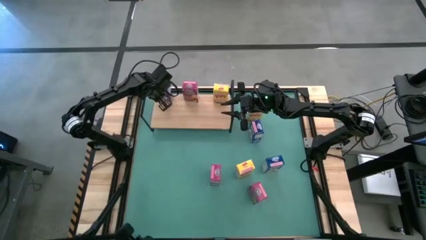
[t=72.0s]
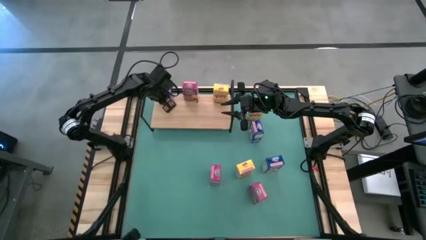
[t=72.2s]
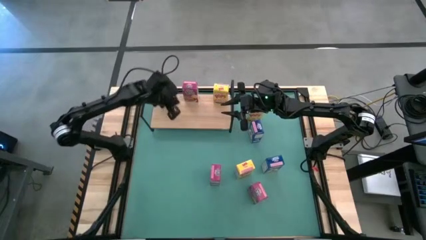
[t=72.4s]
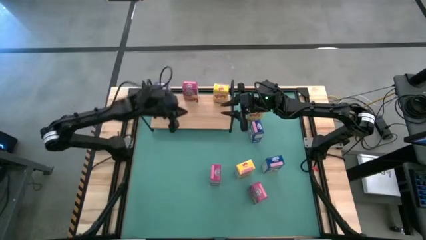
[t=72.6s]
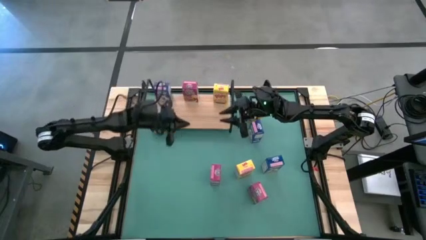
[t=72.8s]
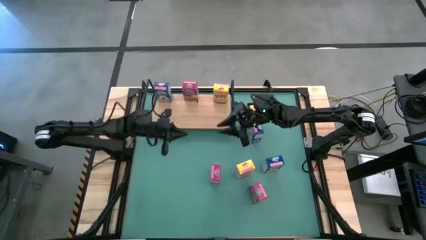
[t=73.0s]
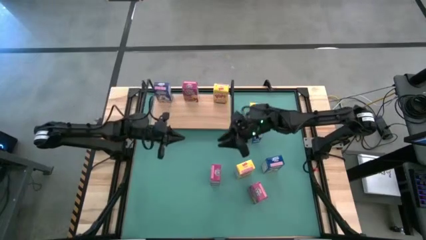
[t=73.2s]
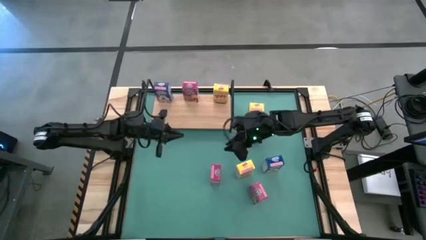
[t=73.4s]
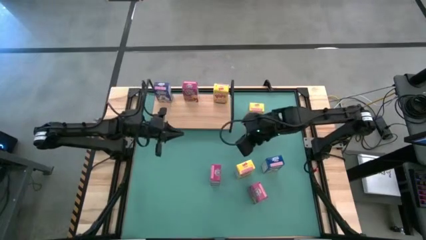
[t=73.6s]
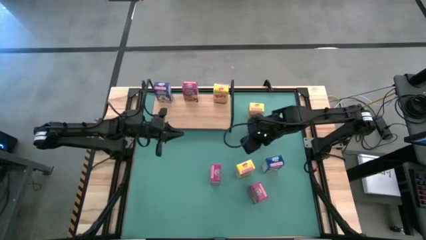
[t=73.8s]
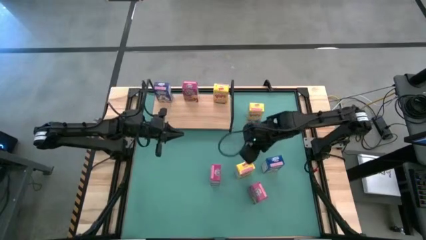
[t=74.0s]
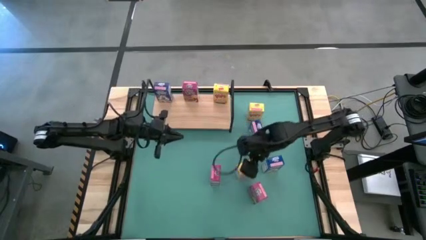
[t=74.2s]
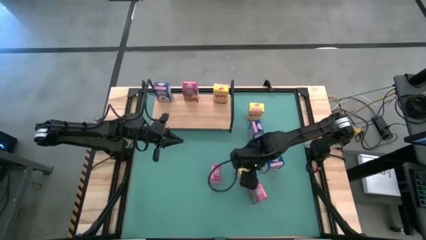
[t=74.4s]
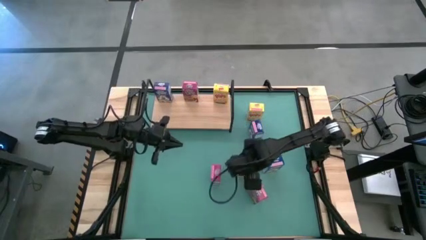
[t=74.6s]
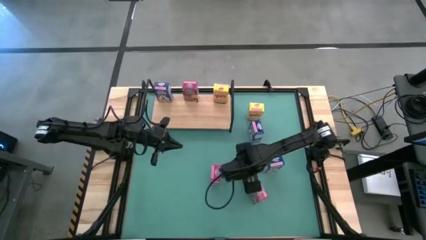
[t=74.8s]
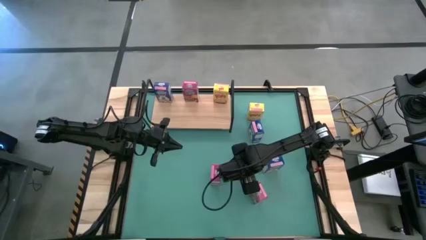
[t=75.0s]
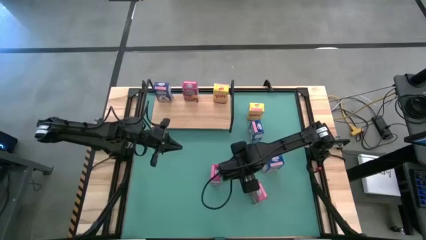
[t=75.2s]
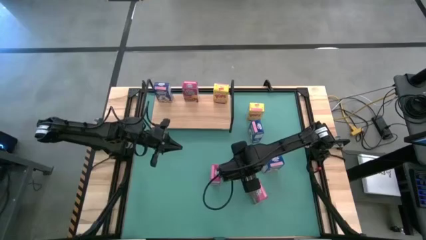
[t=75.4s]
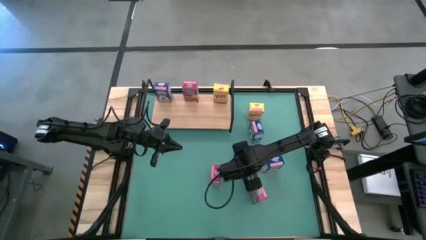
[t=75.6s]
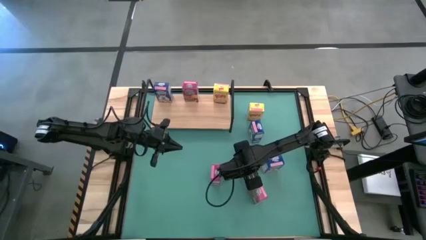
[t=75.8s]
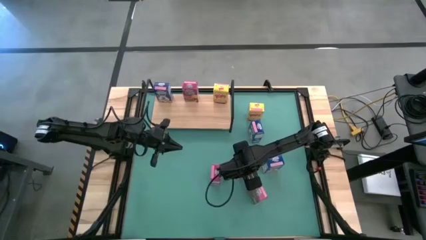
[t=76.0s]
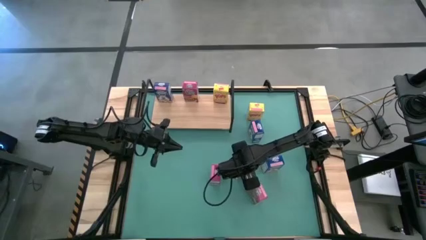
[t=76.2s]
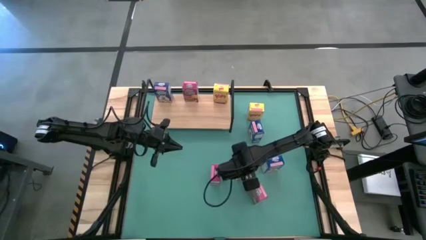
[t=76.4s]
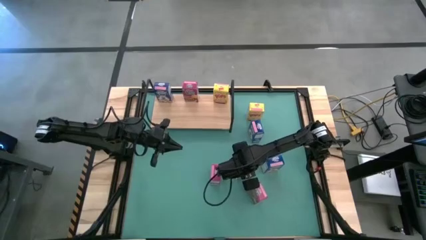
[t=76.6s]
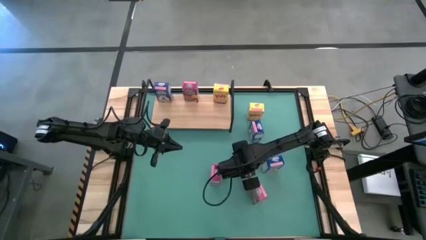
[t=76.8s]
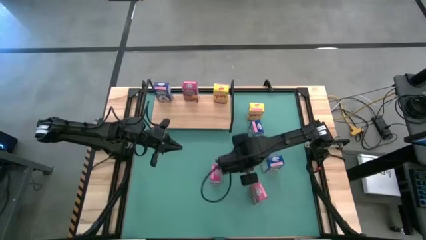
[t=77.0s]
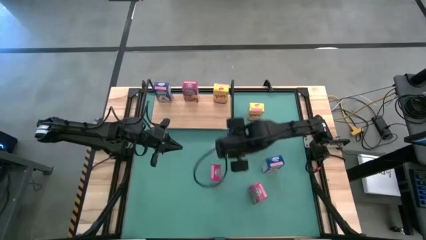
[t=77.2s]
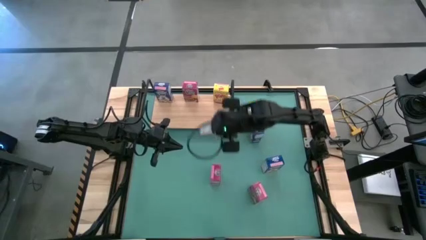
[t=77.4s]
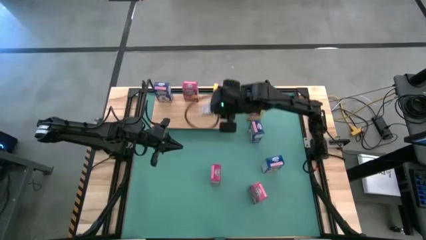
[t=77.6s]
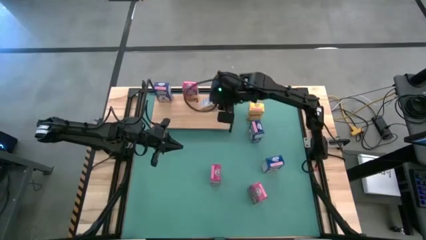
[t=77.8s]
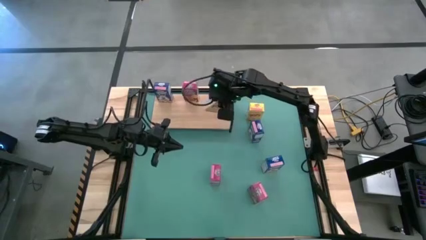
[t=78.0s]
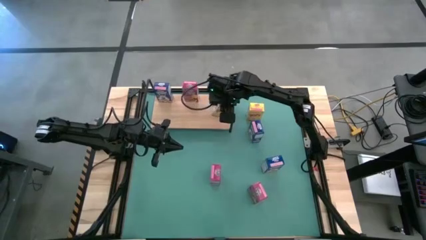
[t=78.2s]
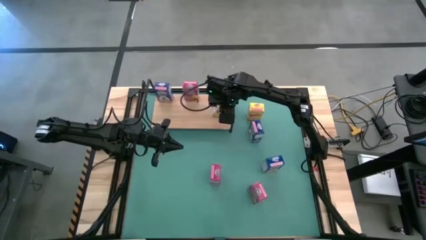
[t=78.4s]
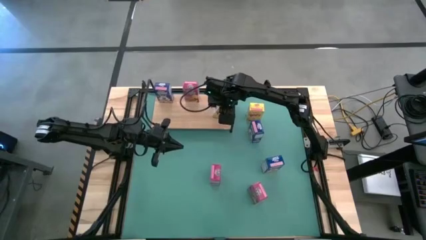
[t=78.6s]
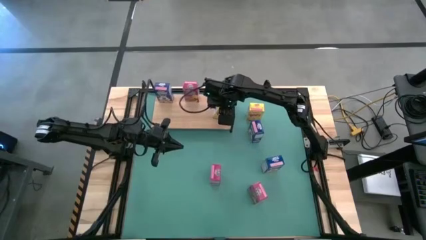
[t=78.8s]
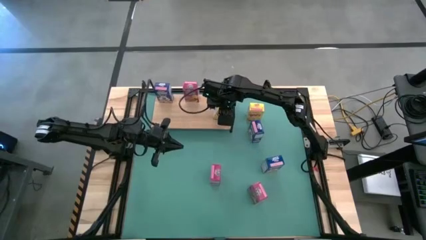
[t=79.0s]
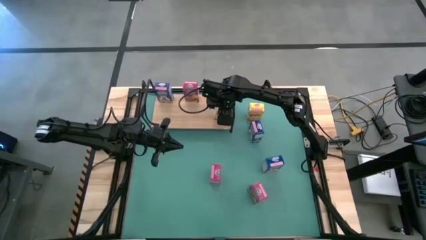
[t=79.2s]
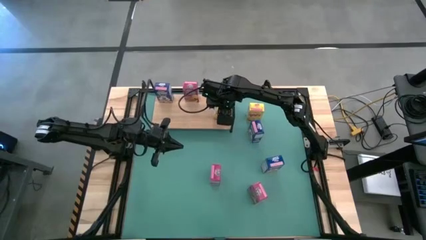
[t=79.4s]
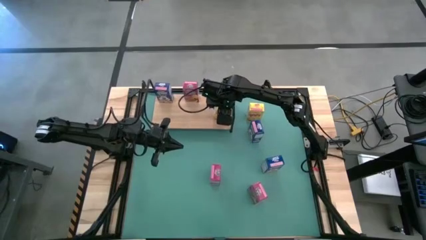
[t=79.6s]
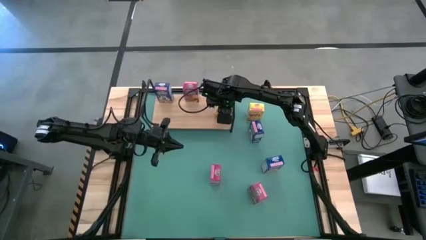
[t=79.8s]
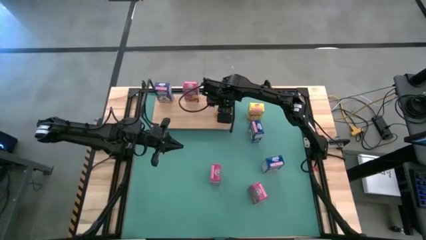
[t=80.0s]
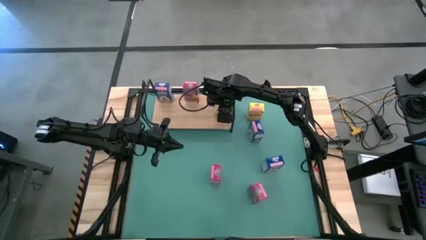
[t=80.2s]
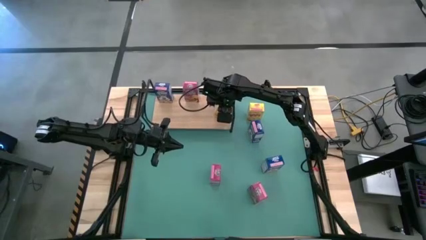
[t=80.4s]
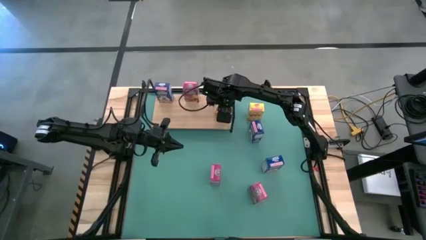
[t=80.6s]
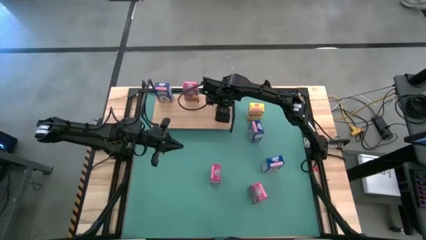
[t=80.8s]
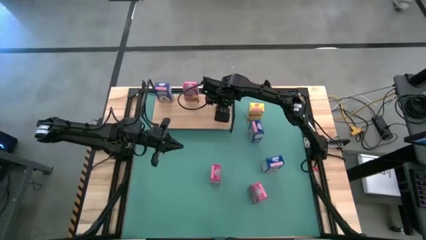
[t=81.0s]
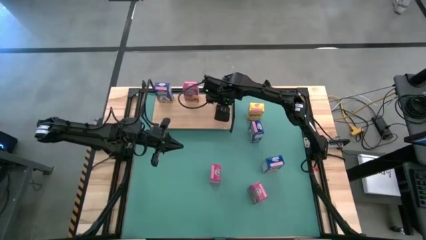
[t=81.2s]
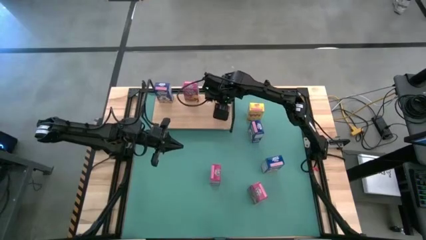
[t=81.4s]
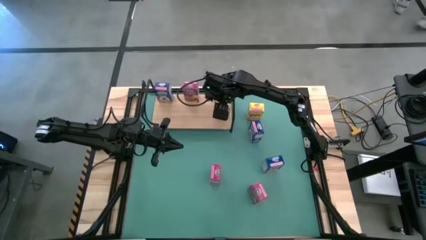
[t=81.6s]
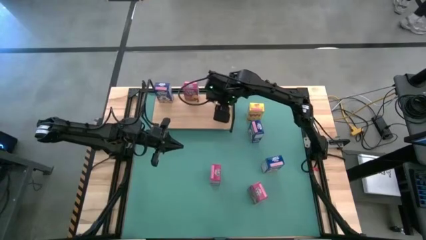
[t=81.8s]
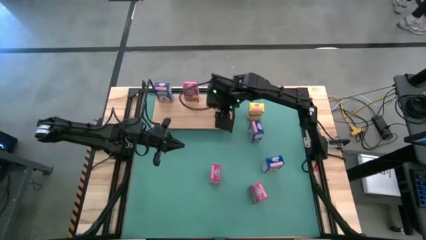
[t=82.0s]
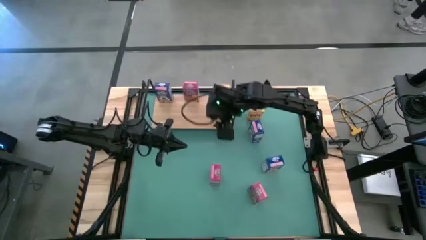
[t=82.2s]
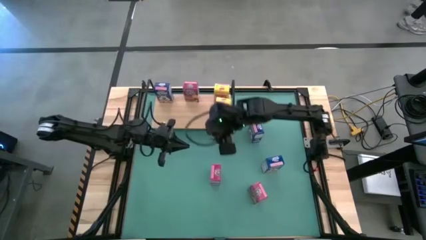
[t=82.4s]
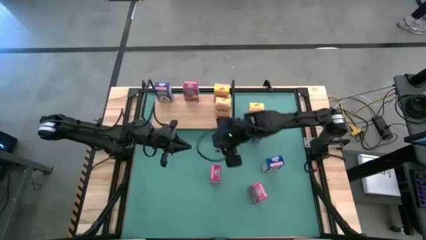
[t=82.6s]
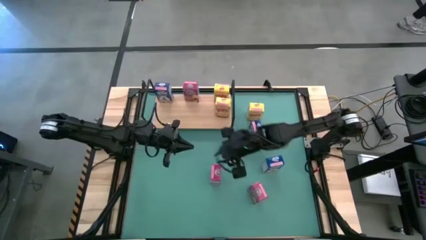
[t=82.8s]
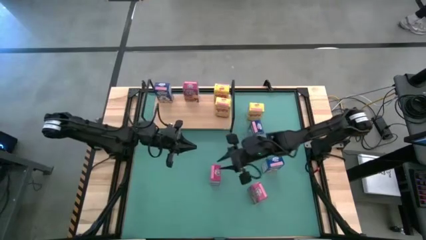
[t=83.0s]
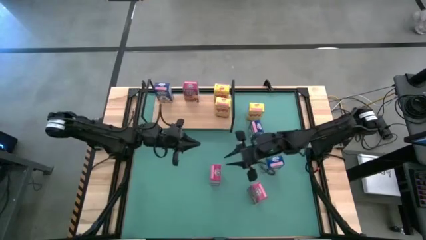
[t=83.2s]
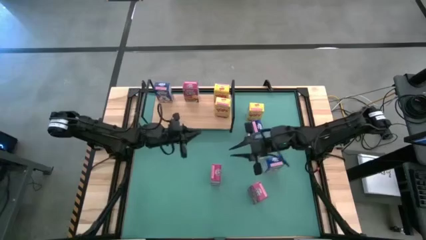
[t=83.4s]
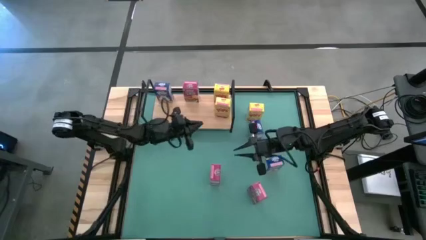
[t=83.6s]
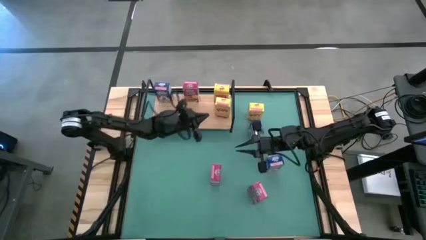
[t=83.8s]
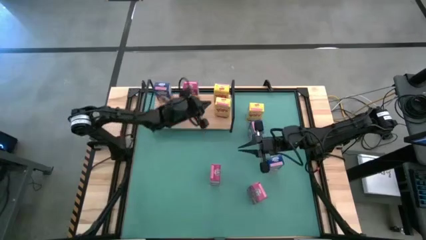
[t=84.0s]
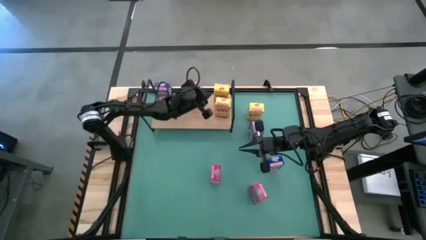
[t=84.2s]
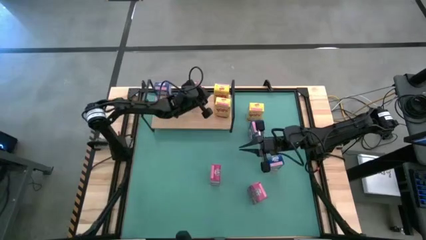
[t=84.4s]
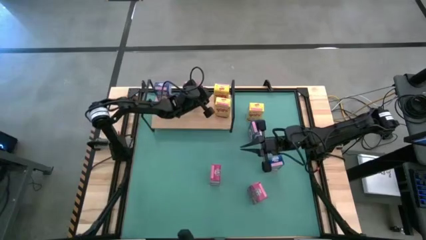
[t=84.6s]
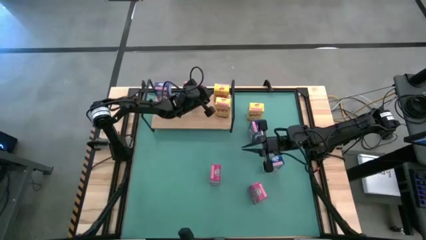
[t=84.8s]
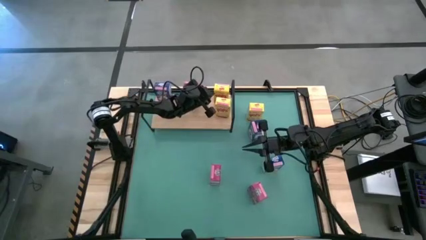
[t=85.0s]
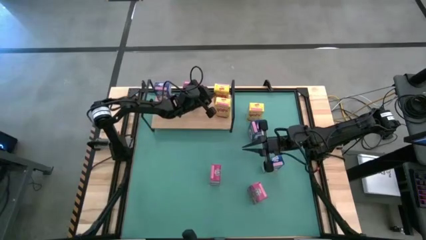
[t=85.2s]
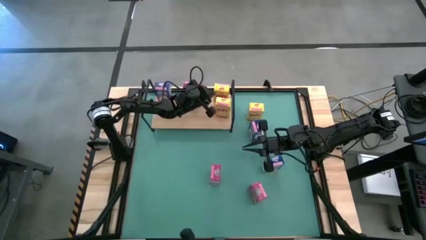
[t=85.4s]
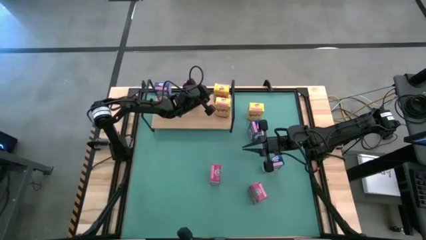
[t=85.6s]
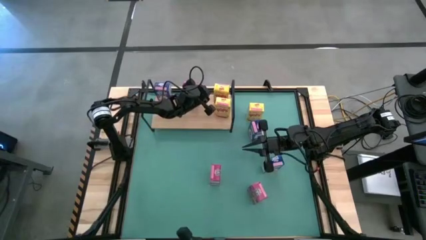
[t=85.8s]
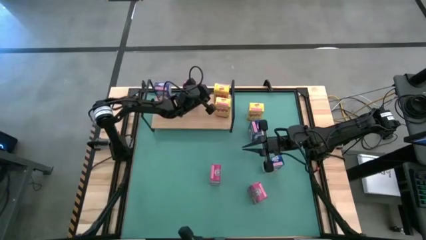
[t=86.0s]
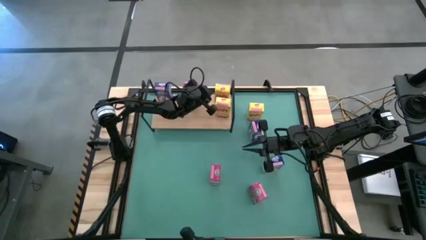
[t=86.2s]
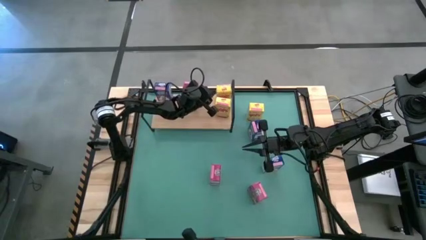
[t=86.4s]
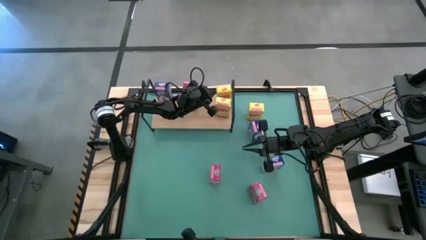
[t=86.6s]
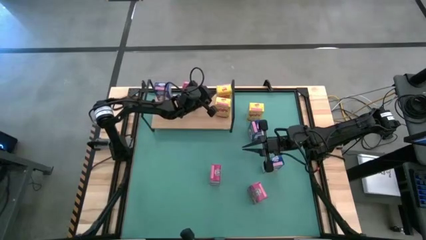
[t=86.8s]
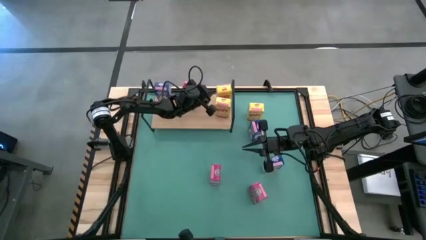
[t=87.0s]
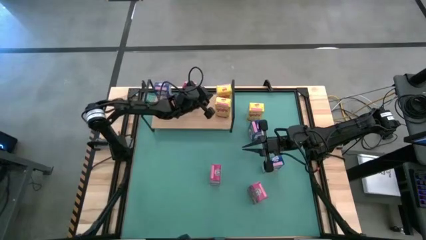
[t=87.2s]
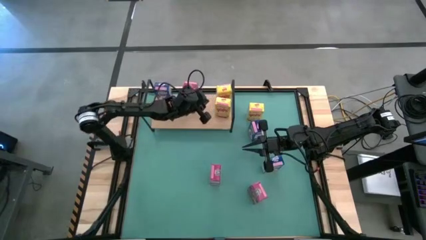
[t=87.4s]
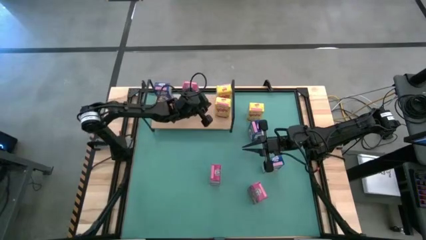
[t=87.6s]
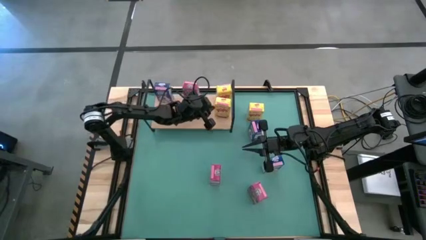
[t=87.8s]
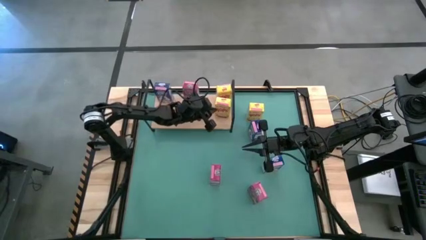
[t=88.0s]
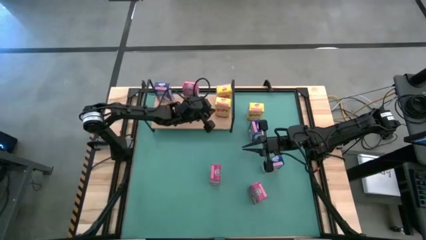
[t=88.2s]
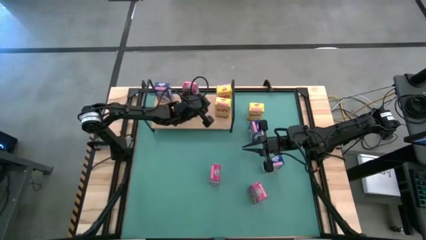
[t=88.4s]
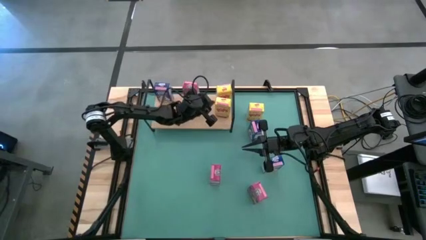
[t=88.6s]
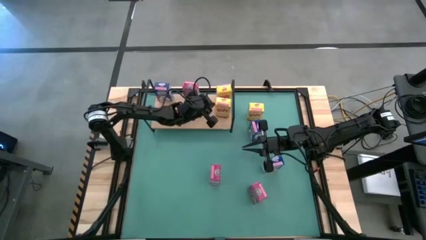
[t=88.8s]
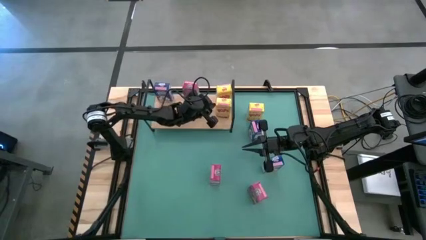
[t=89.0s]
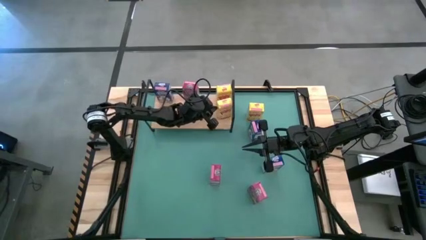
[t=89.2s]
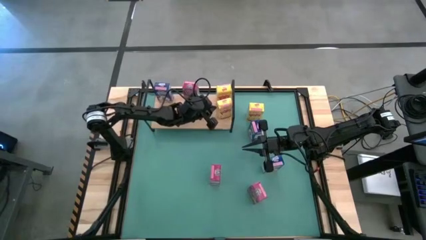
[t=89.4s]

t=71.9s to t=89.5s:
Task: Stack cereal on shelf
Put the bottom yellow cereal box on the shelf
